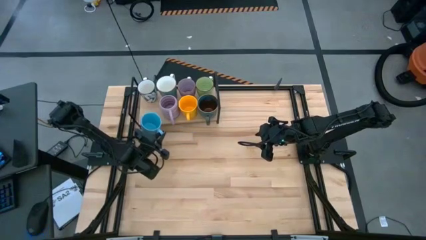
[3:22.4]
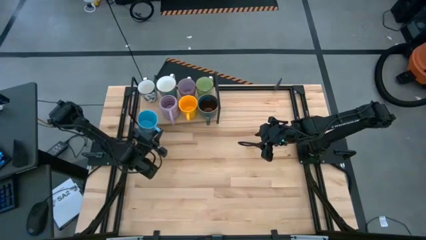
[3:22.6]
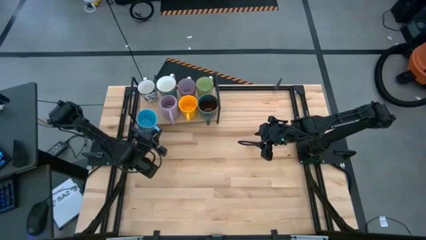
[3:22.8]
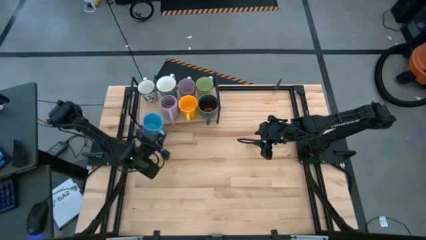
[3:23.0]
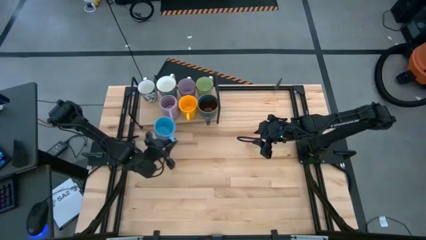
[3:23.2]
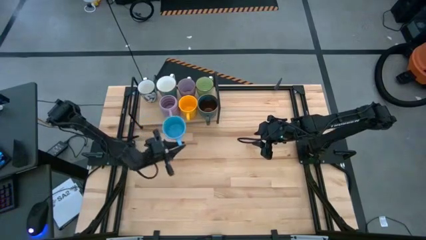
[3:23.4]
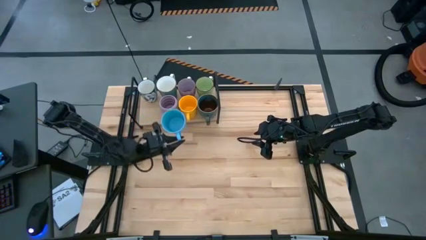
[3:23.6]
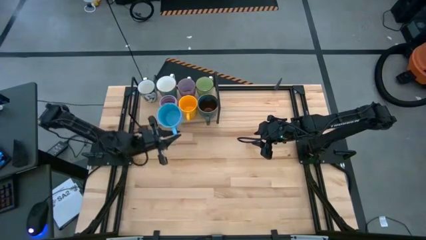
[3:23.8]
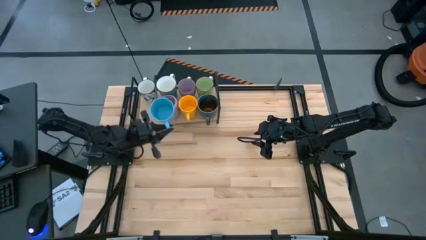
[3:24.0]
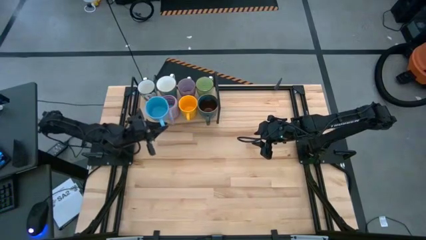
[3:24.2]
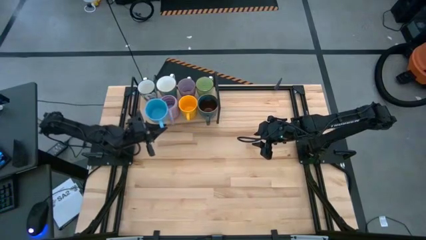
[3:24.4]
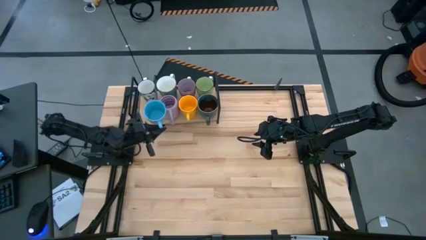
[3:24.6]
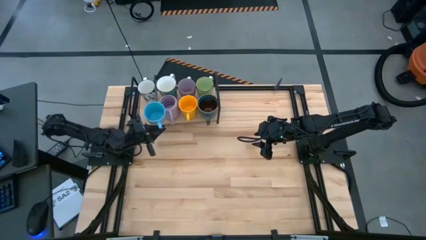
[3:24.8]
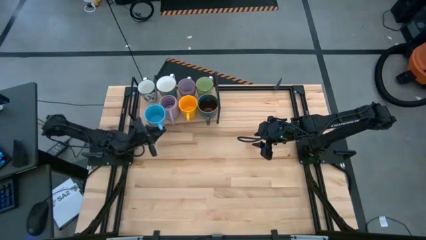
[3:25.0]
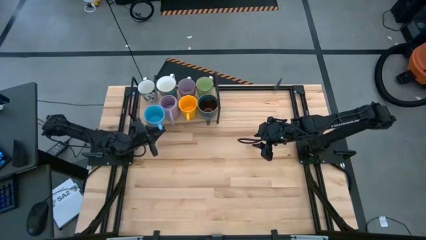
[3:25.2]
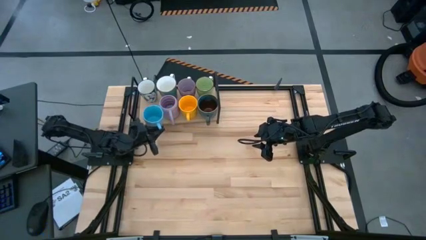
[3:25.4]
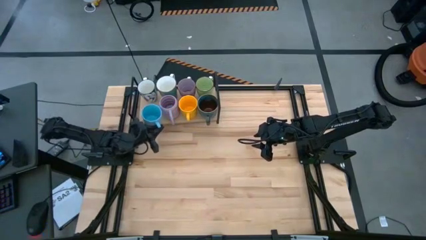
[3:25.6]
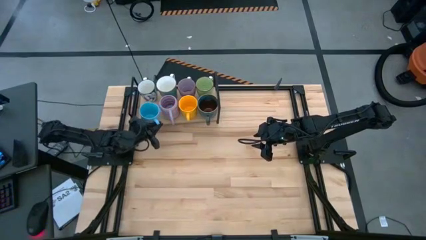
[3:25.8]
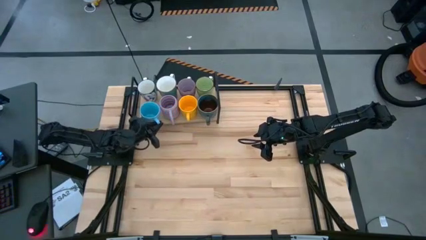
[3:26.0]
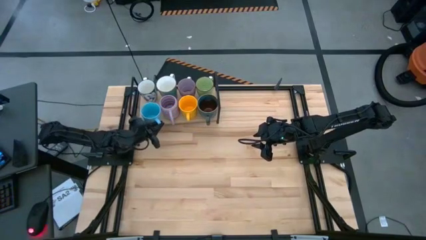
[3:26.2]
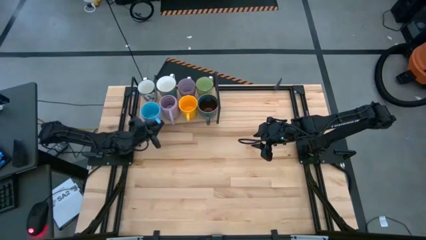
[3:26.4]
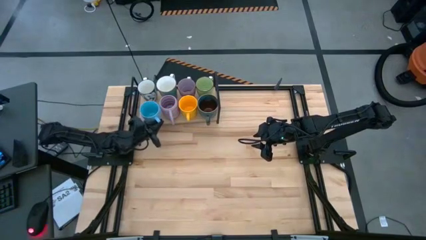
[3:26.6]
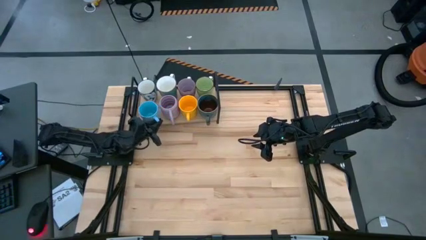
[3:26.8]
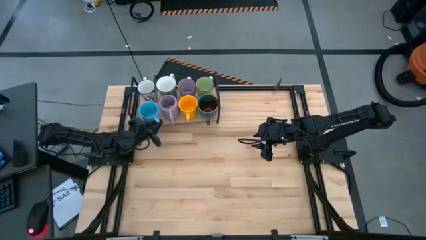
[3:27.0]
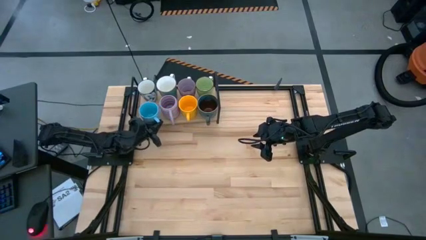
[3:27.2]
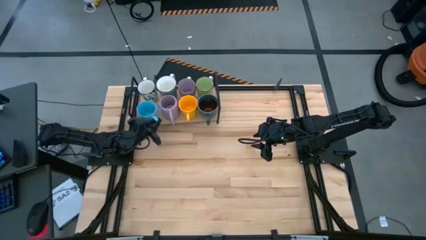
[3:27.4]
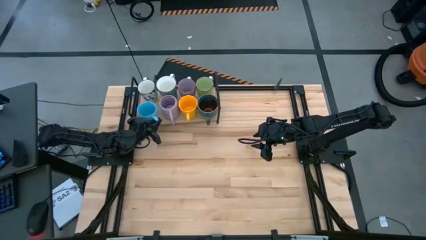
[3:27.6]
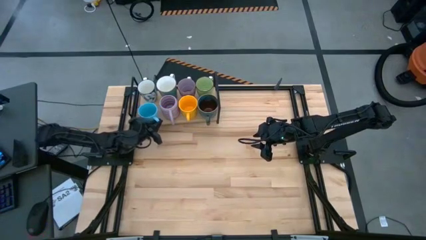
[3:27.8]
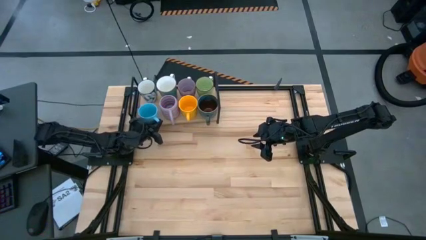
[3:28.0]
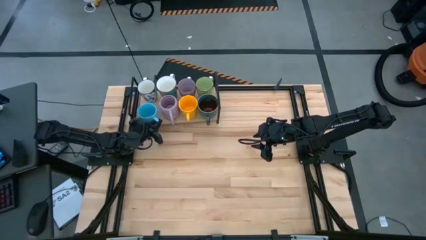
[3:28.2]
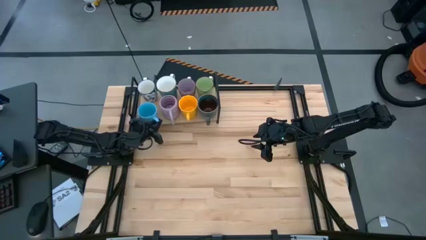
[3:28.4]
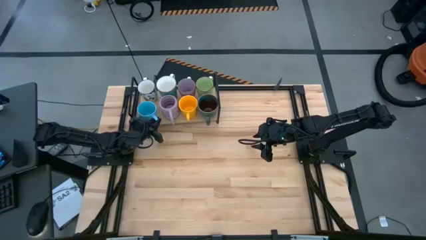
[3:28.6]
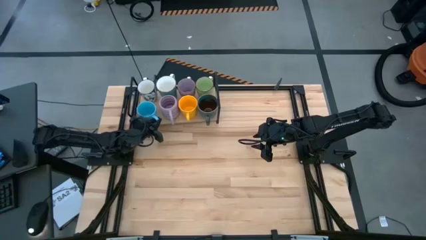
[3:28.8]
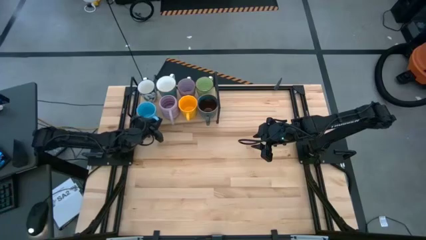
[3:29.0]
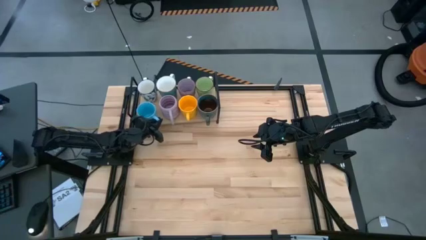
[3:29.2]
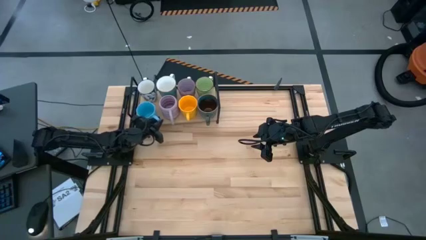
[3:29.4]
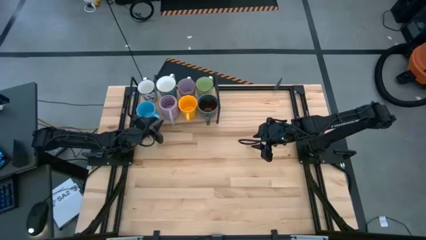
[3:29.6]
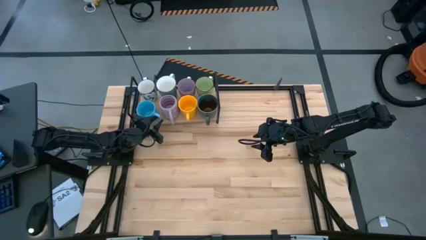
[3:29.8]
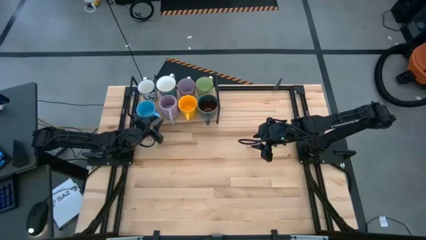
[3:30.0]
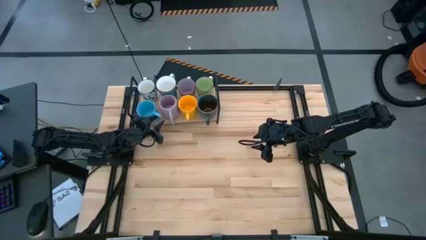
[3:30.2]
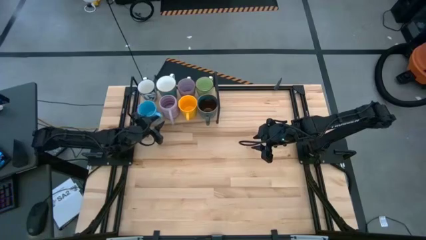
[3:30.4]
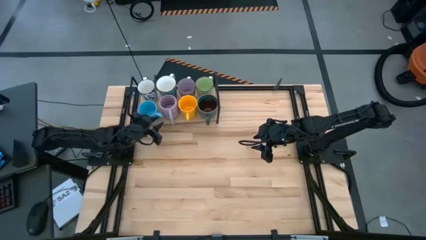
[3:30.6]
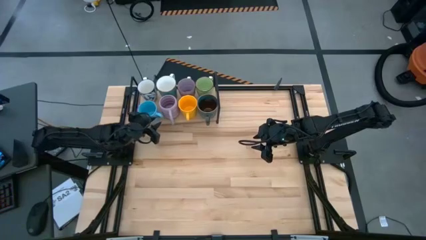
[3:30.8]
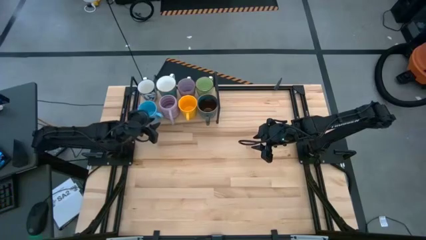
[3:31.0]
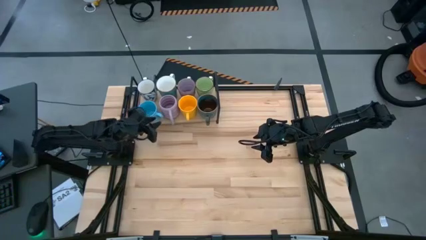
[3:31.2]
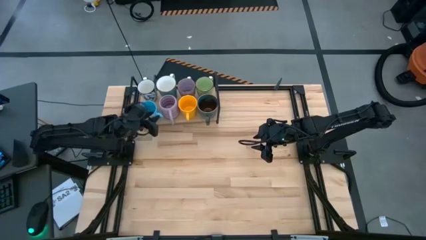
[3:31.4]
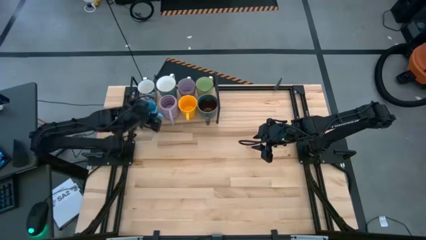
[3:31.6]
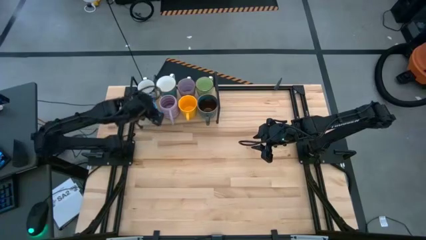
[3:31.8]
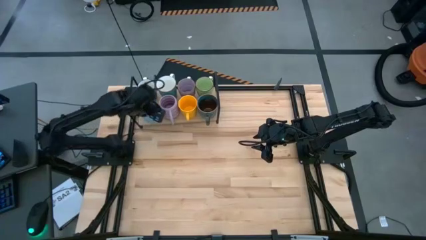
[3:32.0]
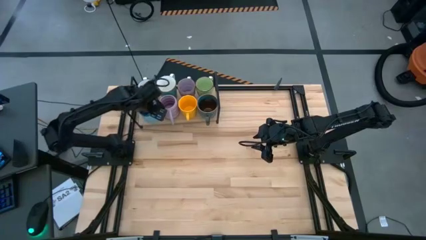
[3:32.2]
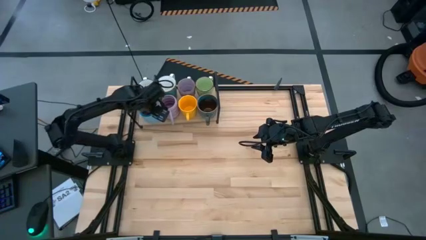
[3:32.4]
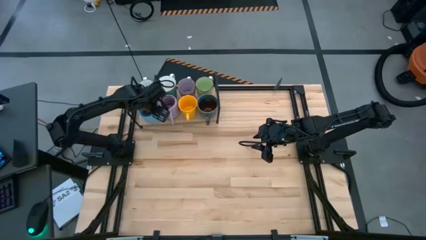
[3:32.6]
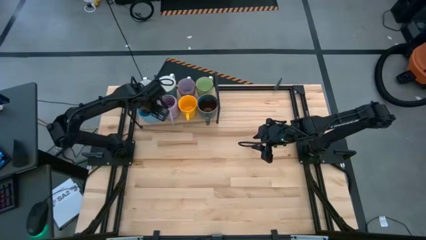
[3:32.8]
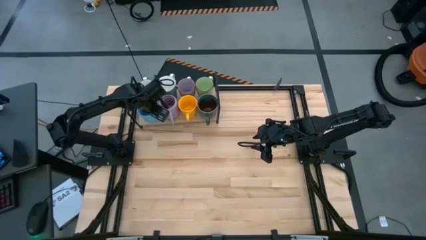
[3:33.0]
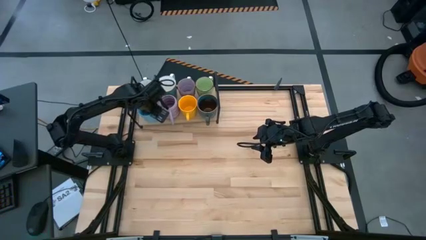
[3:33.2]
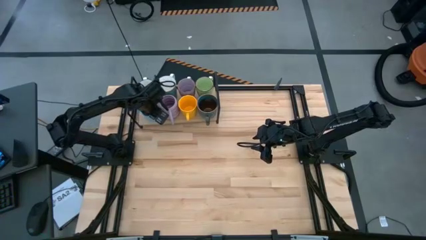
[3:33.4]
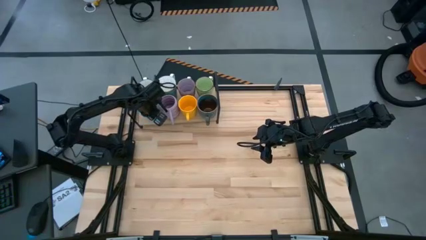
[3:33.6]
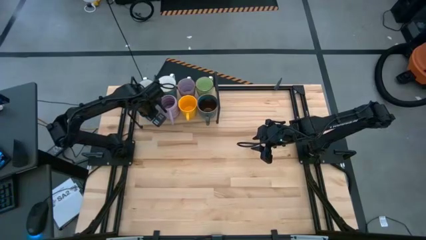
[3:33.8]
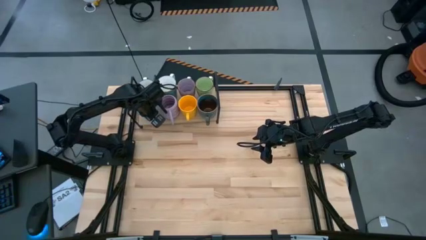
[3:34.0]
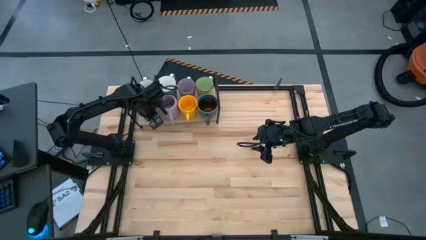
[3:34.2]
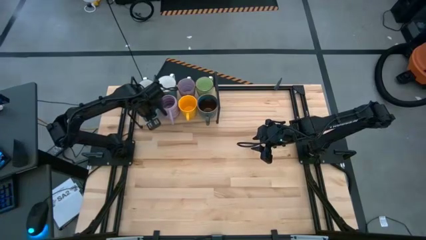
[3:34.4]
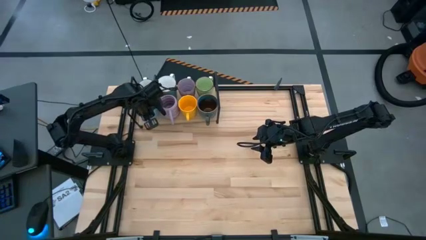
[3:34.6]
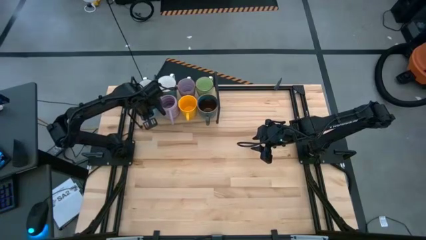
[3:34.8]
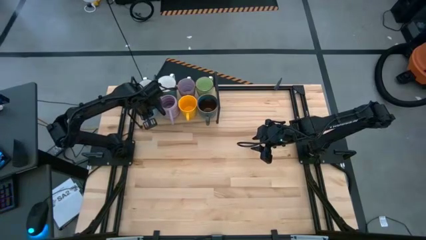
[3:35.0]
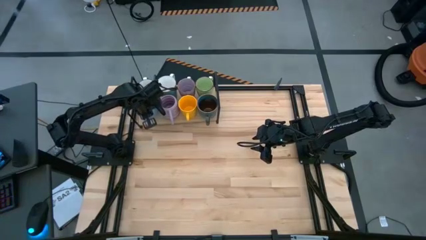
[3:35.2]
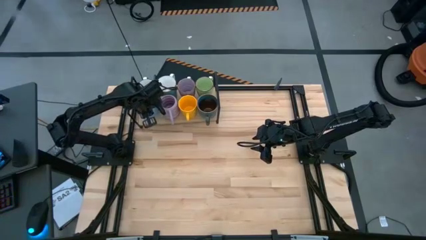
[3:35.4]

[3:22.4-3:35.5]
Task: Place coffee mugs
Put the blue mug on the shelf

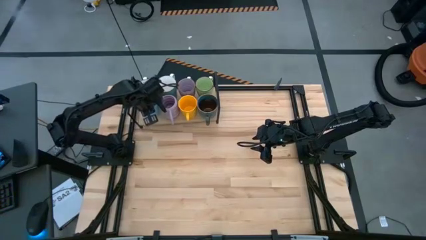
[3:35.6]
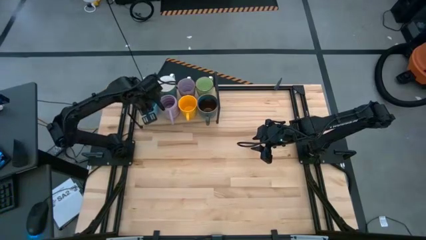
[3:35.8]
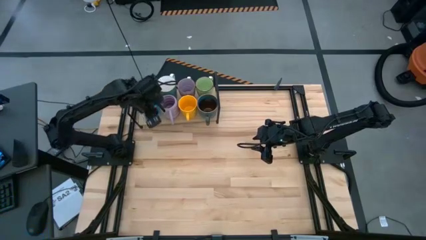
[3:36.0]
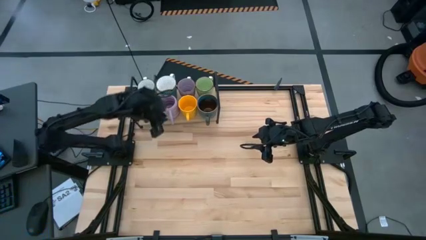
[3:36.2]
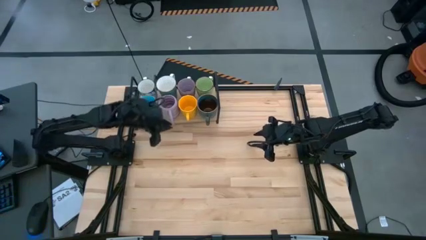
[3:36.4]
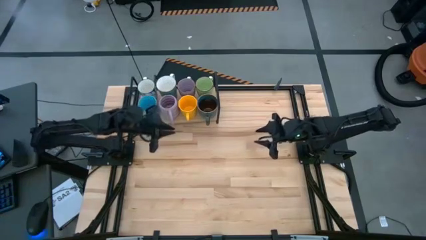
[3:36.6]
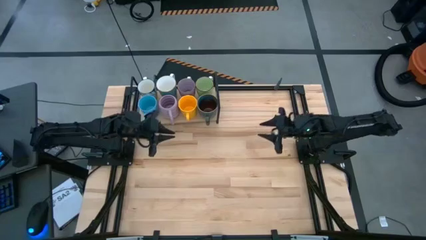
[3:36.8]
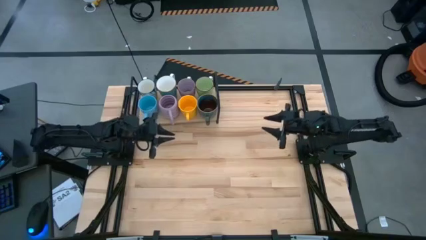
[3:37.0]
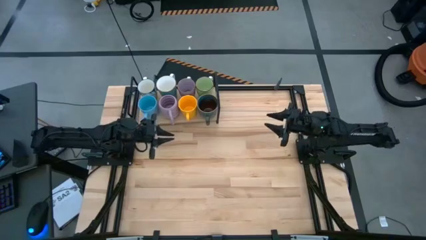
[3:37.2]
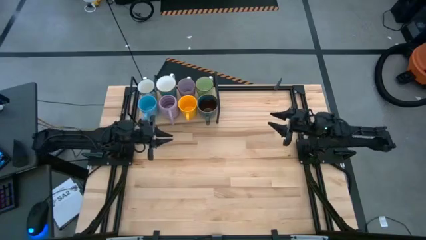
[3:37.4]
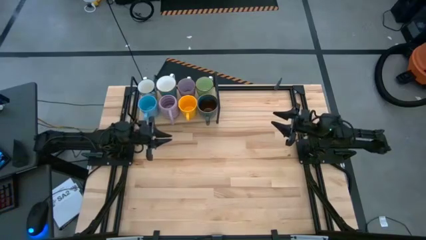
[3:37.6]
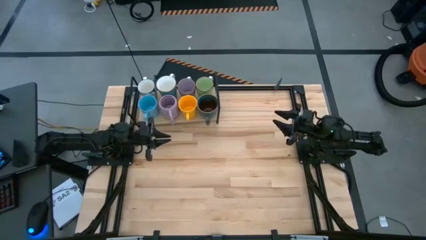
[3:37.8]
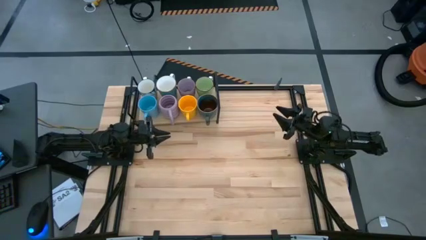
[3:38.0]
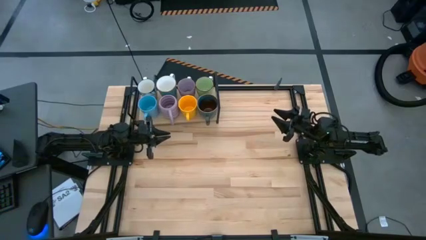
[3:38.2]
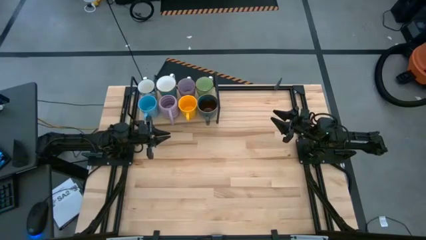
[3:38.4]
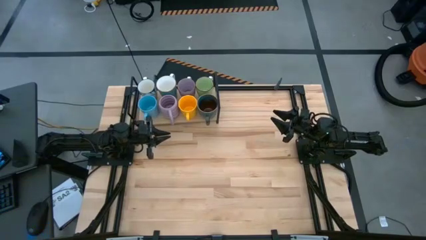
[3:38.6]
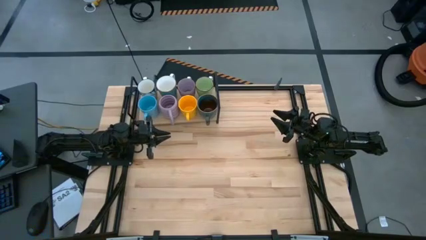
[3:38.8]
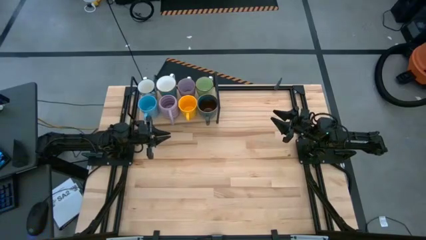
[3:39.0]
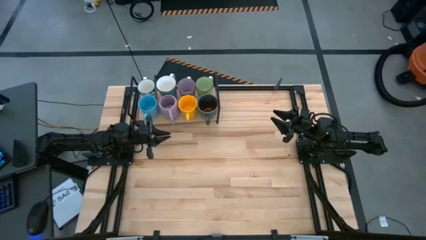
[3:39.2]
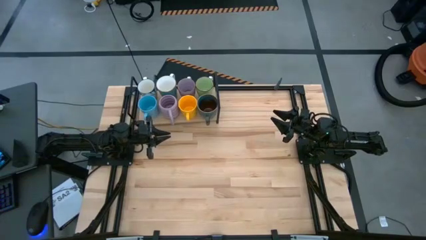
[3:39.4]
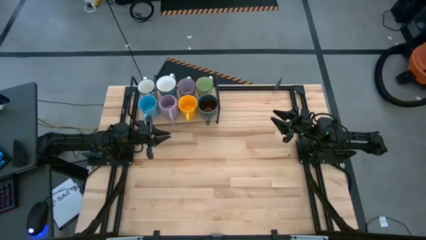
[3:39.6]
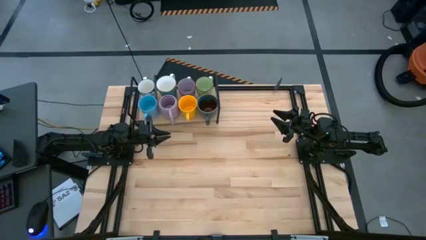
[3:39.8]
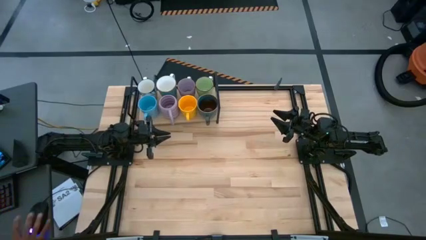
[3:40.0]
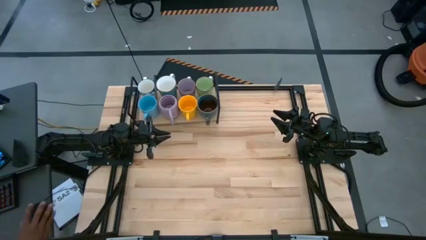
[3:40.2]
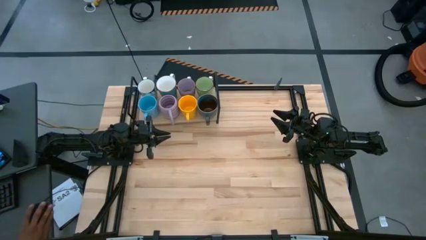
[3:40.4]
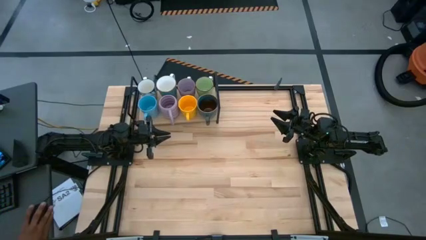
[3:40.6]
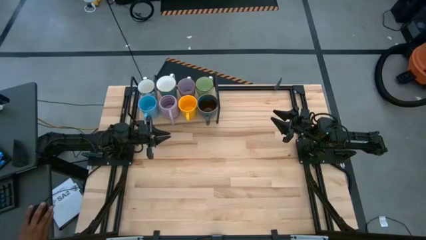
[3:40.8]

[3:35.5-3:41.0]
Return to Home Position
